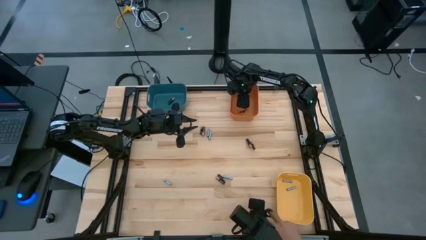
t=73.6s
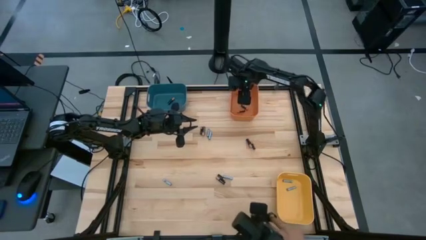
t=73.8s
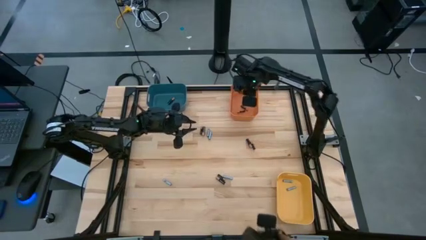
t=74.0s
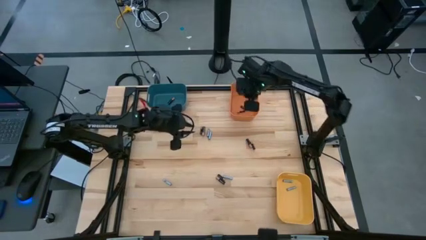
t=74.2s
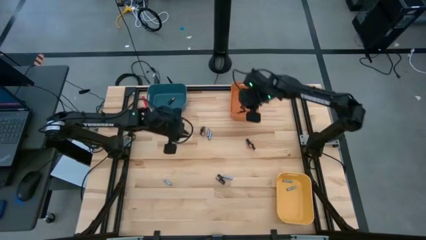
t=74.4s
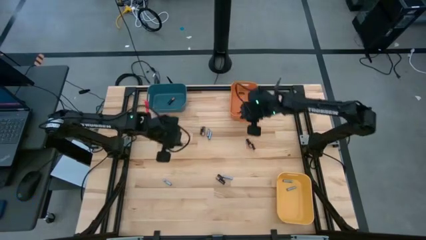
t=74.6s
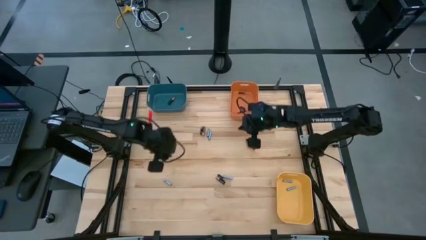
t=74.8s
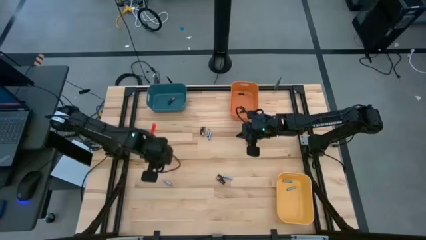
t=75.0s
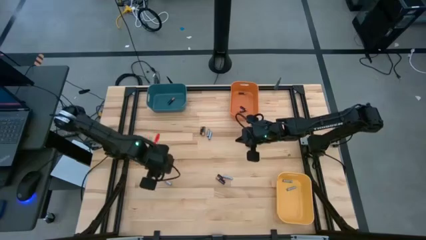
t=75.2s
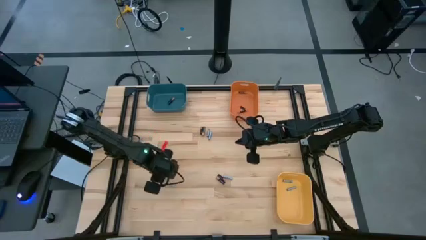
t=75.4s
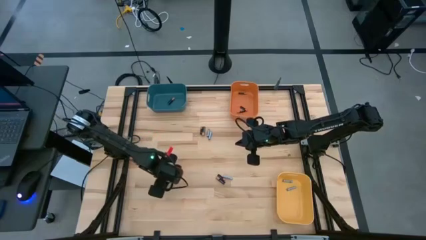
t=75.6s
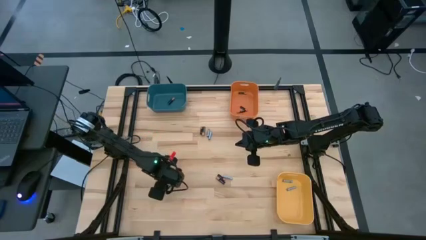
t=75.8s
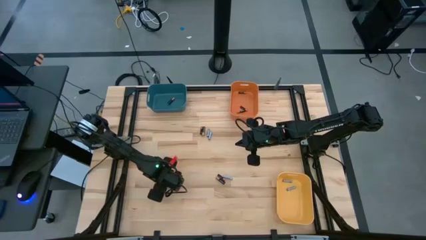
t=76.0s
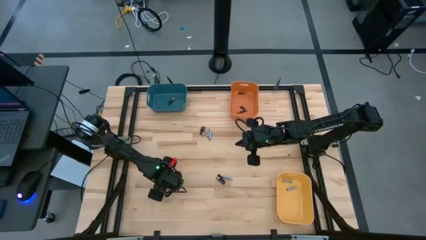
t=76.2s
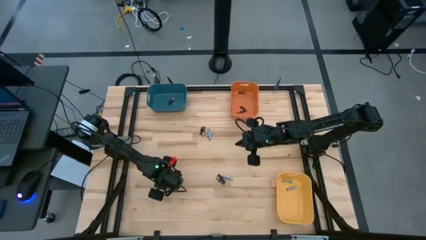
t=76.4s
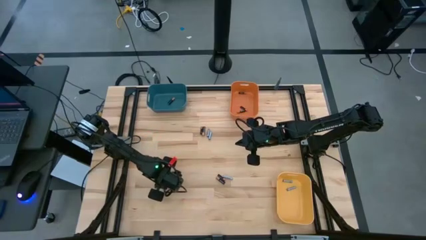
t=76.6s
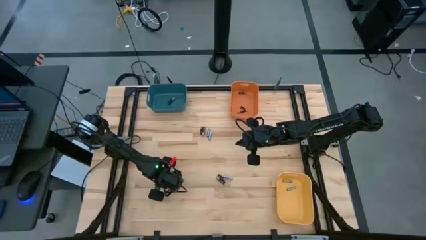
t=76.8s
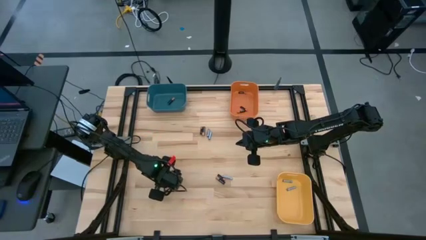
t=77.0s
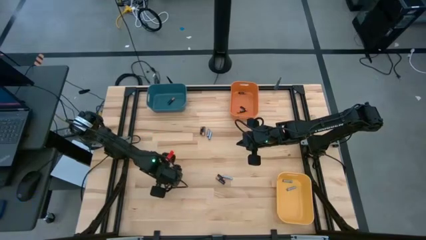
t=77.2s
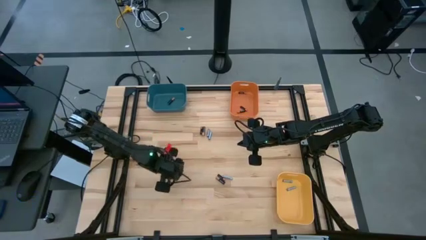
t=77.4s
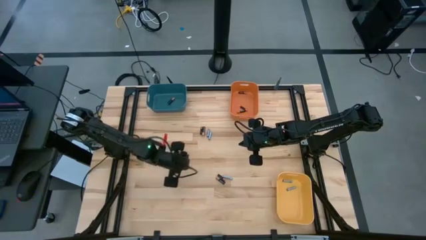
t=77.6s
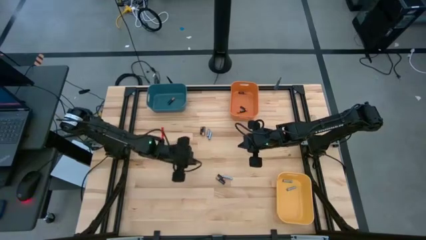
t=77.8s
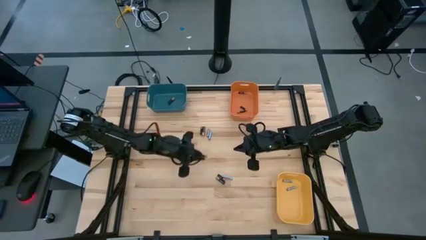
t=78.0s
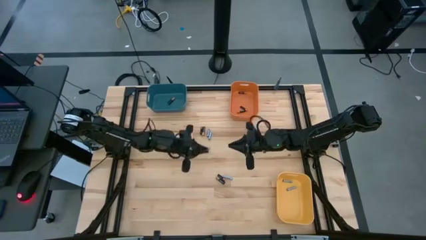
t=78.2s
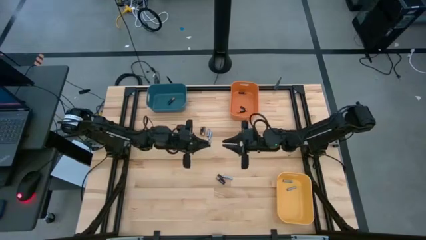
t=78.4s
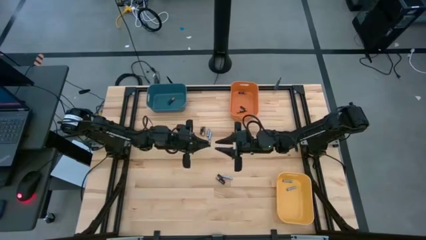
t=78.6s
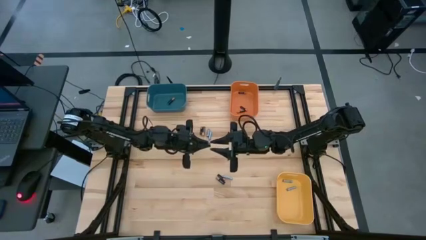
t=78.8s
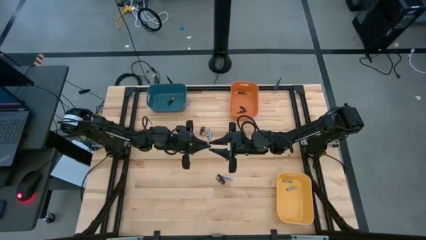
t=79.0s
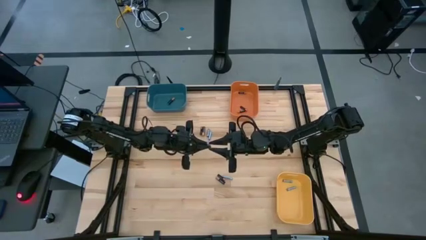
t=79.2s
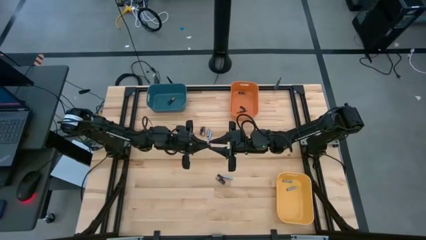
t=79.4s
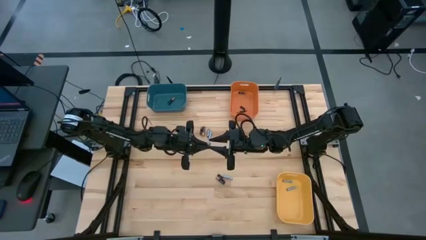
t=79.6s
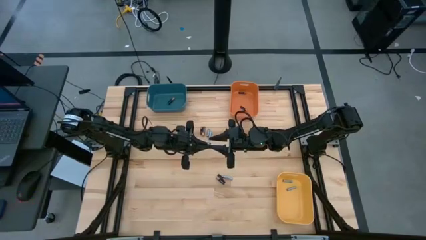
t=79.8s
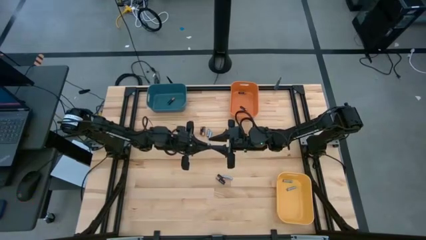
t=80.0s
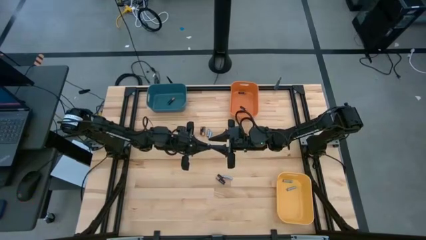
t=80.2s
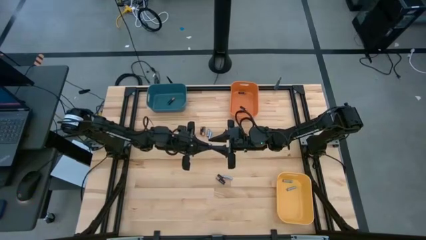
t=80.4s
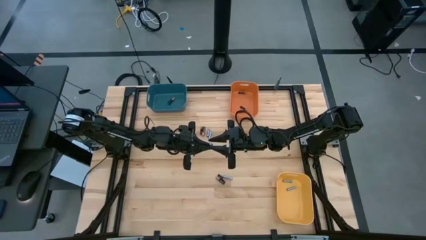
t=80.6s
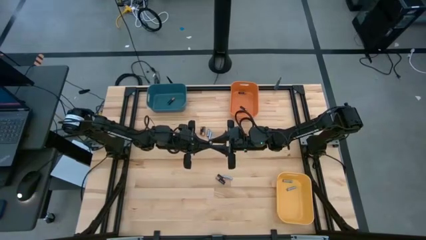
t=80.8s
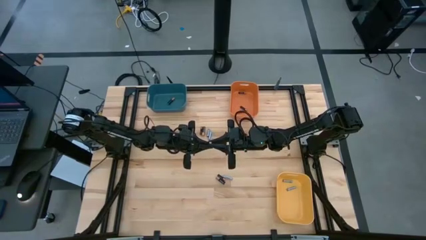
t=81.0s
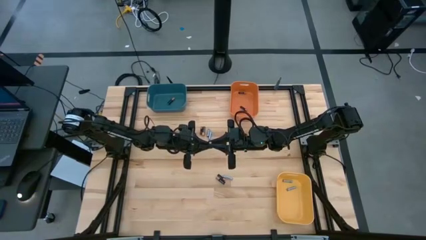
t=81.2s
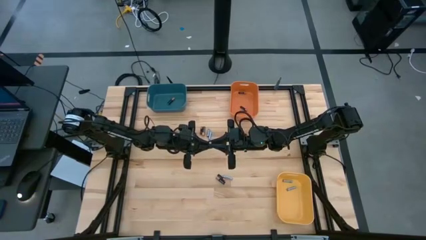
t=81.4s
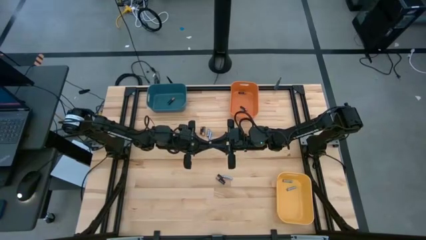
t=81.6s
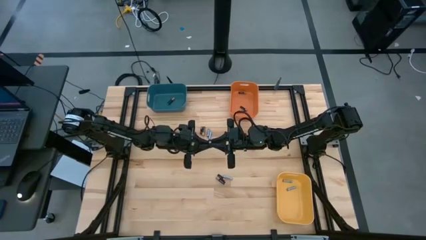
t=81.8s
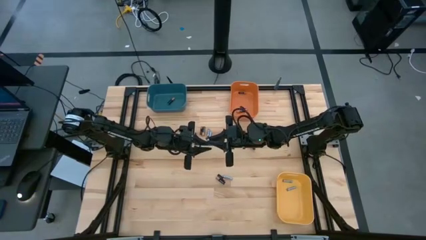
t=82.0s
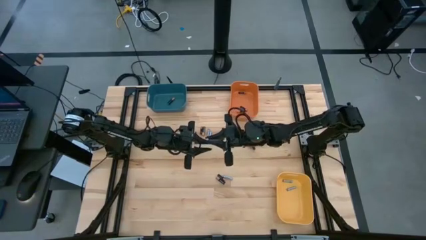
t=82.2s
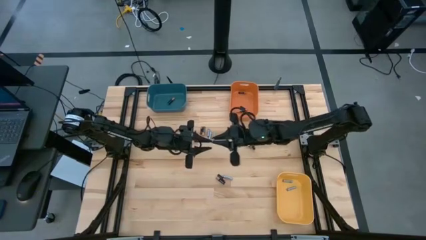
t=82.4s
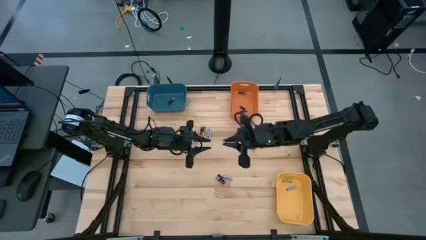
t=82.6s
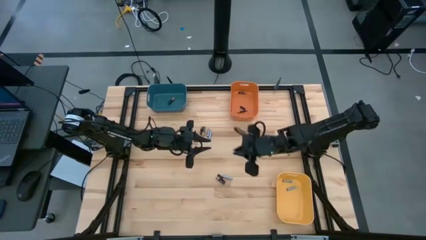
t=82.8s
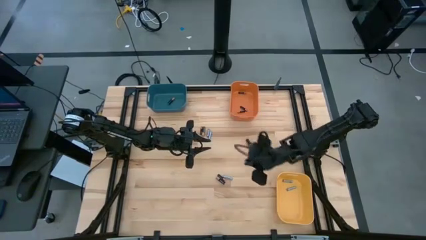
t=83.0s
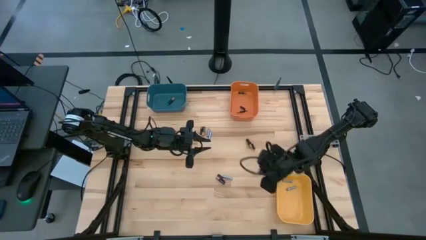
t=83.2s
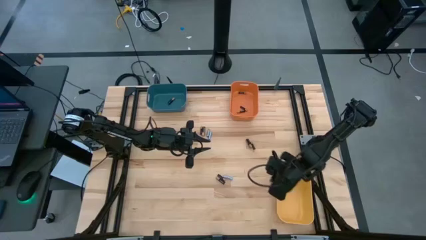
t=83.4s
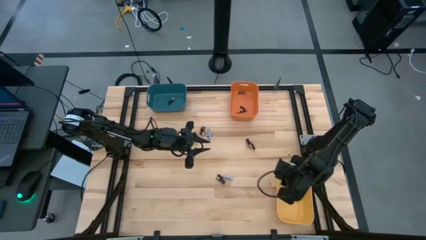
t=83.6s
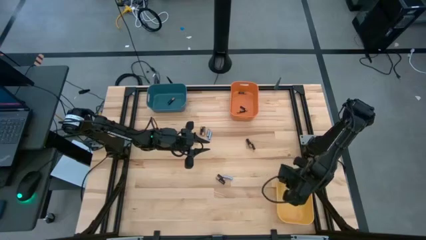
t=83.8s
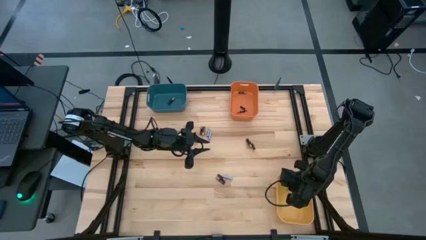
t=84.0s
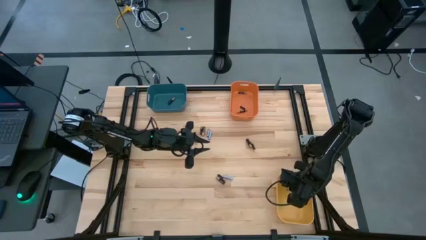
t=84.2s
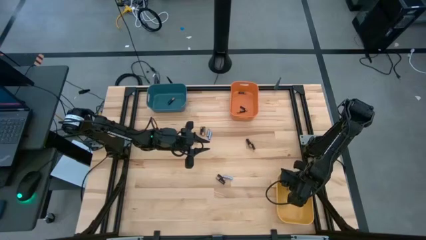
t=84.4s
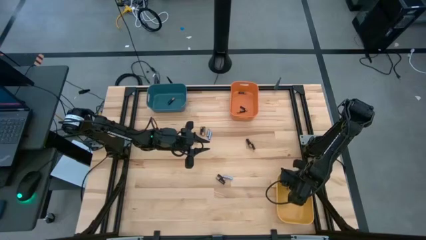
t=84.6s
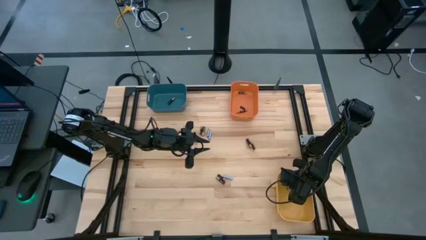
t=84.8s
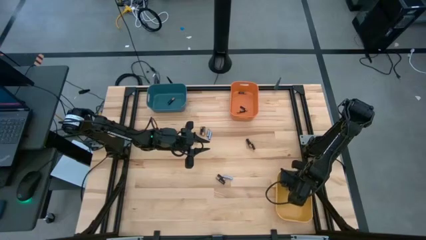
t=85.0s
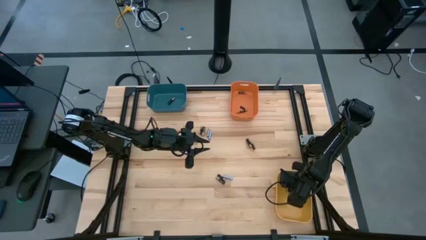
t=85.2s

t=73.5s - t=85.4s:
Task: Sort batteries
Put the silver battery into the yellow bin
